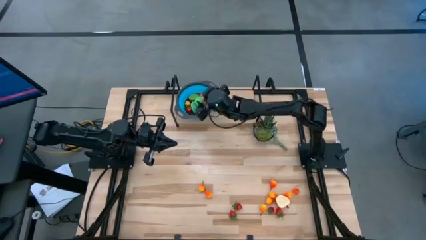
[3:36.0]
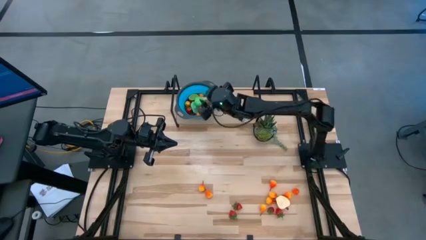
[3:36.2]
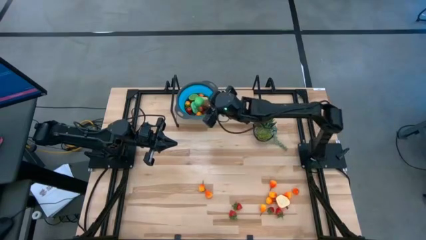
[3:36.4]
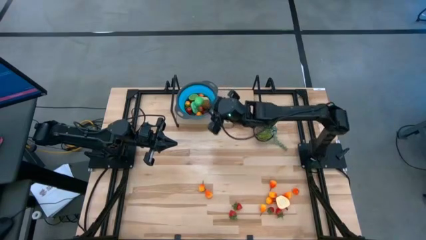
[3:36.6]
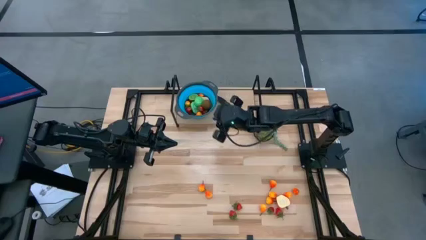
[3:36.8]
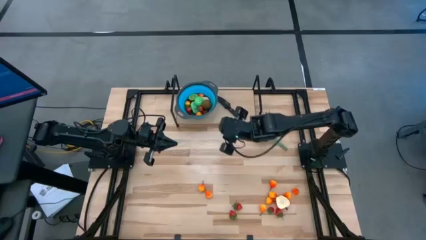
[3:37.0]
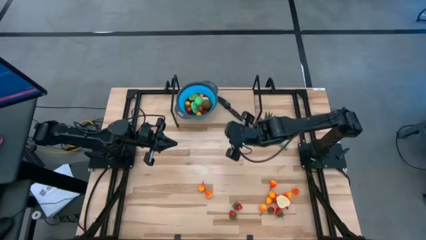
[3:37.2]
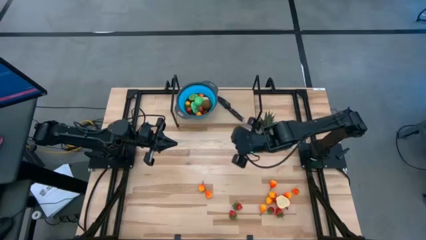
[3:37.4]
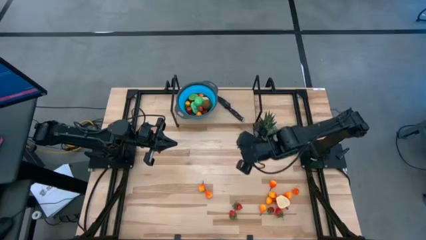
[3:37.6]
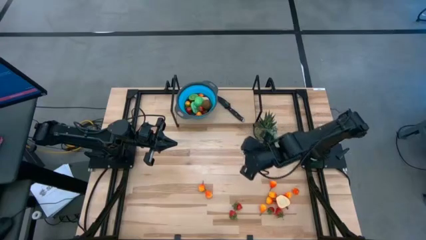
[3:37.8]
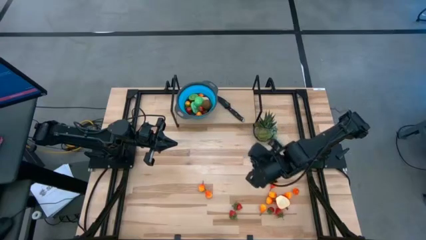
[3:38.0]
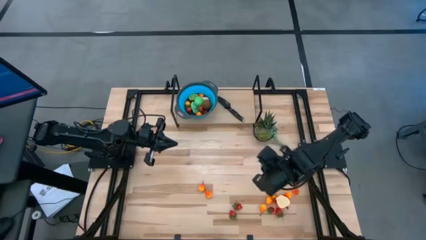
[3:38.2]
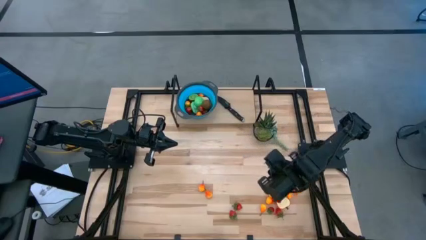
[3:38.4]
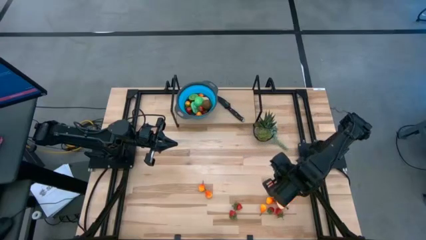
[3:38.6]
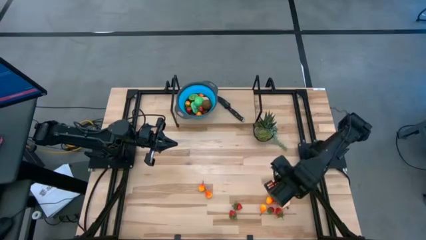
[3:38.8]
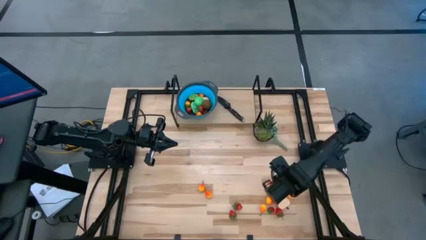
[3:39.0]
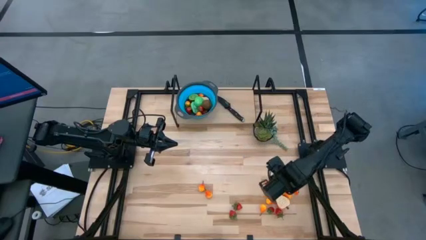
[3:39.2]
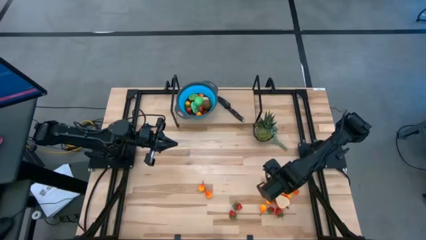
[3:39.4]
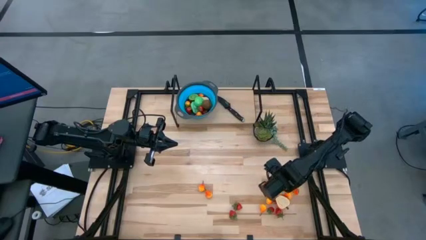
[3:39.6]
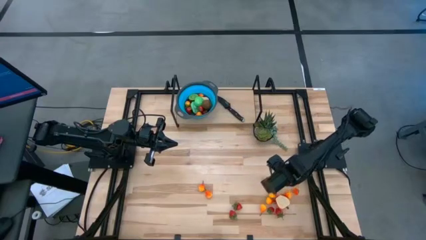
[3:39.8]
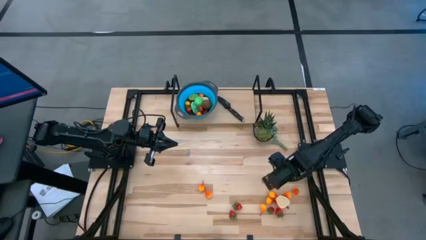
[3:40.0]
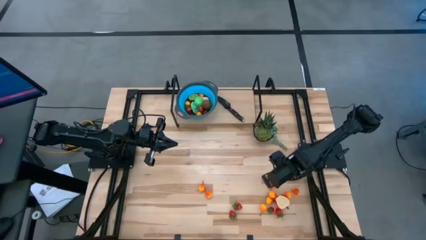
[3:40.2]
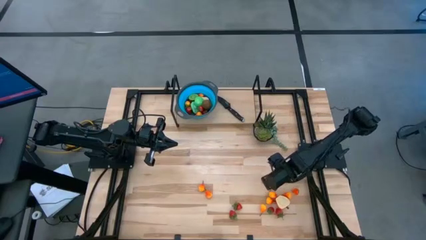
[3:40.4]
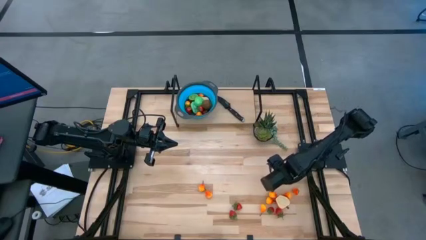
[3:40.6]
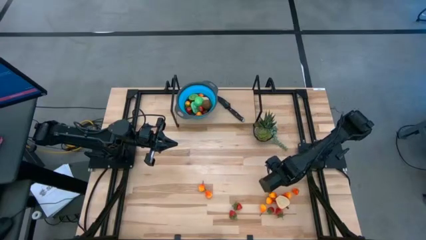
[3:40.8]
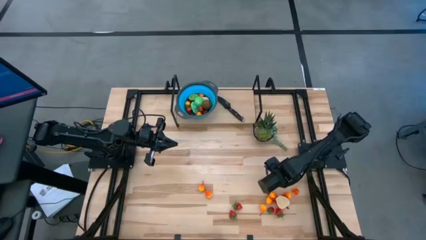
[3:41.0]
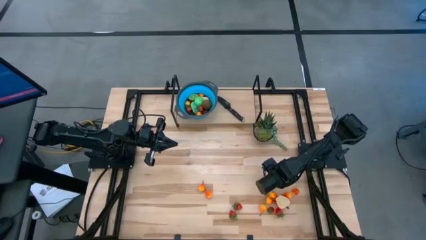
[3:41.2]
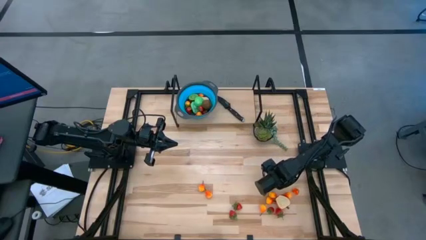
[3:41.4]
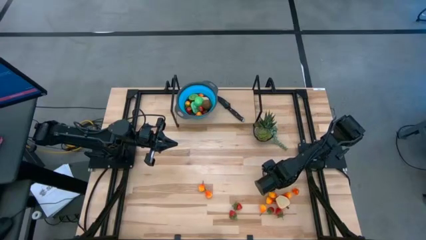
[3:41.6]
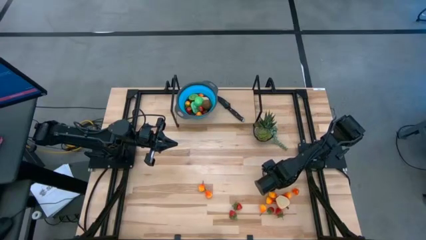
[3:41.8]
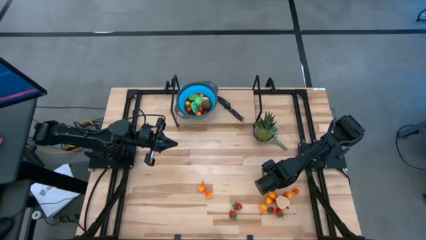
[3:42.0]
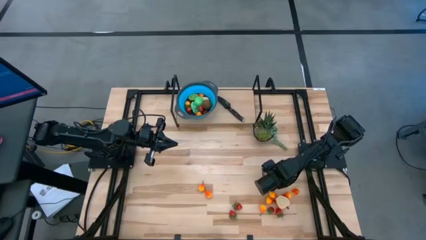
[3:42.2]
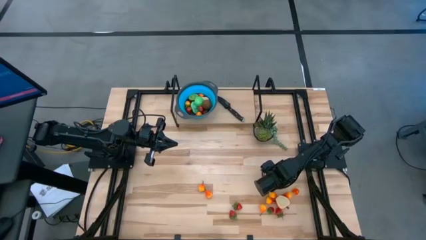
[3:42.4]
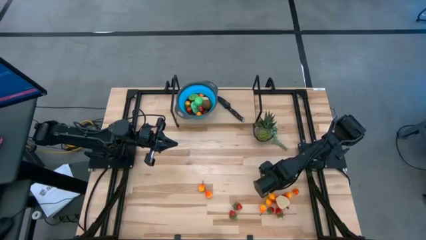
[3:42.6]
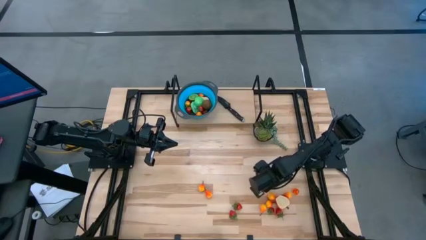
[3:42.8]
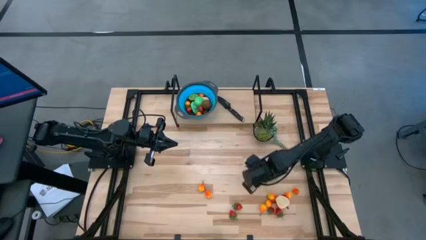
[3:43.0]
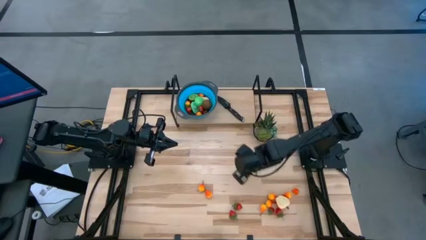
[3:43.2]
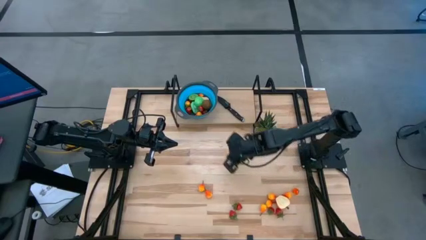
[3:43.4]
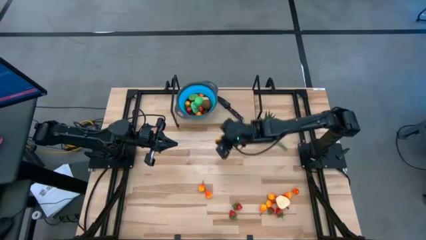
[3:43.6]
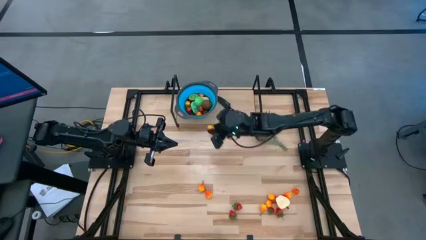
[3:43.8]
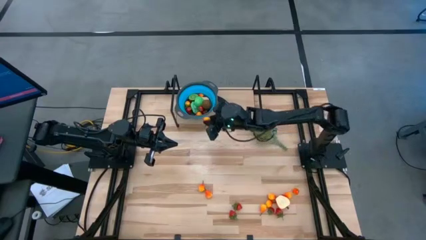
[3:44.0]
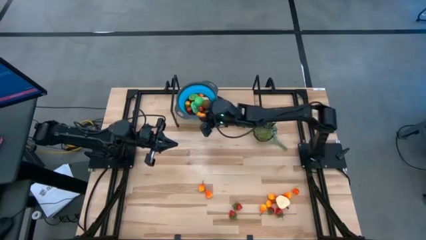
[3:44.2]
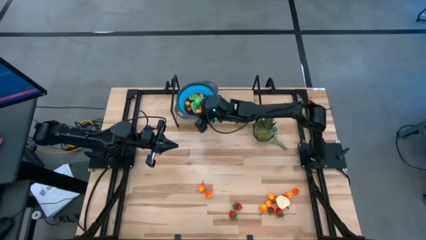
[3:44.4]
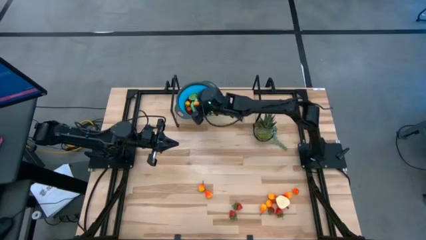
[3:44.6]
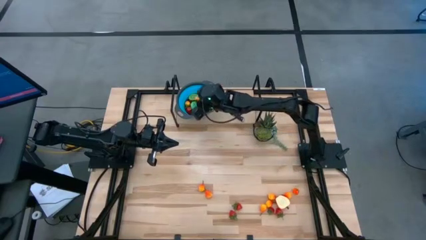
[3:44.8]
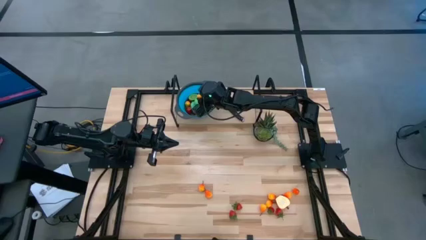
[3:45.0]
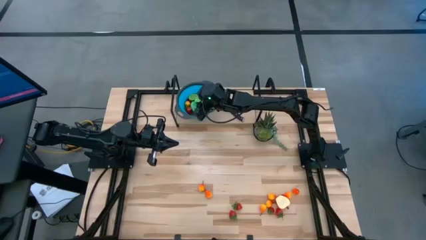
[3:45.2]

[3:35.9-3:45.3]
Task: Pick & Place Fruit
Put the pear into the basket

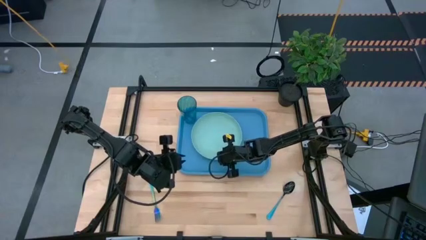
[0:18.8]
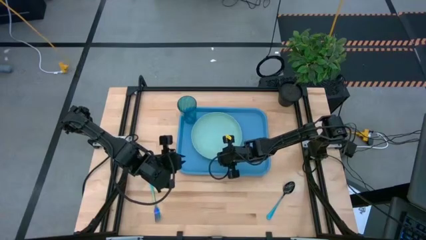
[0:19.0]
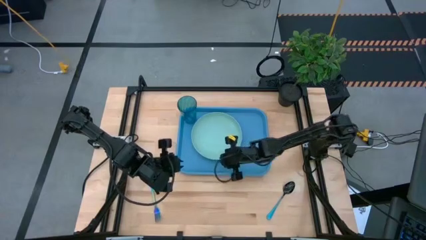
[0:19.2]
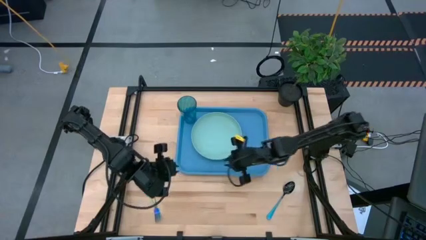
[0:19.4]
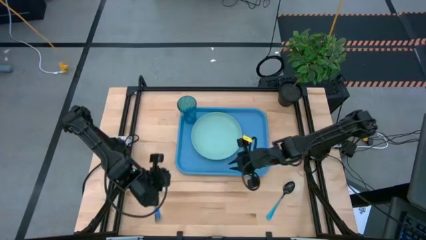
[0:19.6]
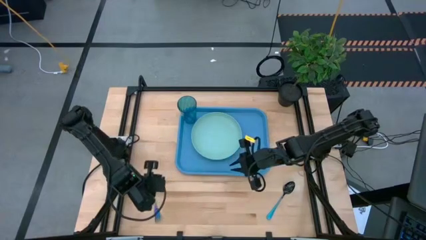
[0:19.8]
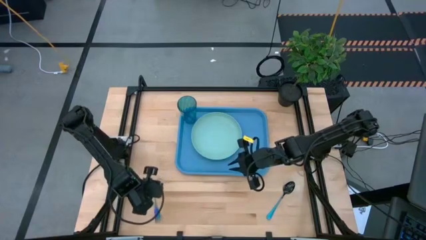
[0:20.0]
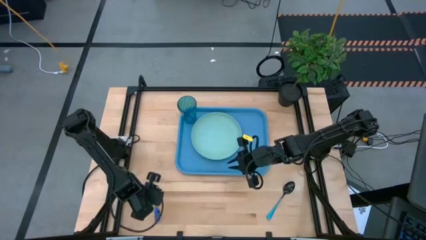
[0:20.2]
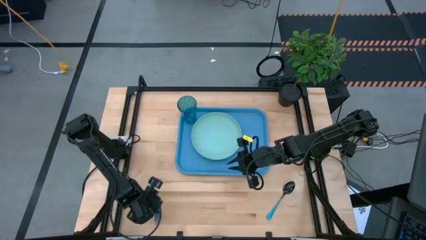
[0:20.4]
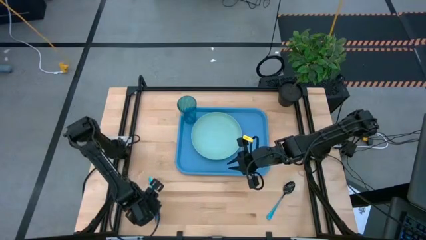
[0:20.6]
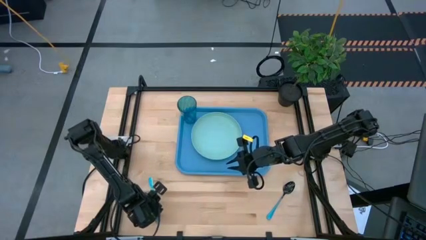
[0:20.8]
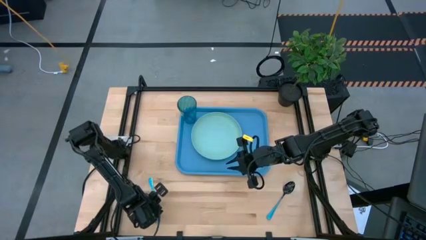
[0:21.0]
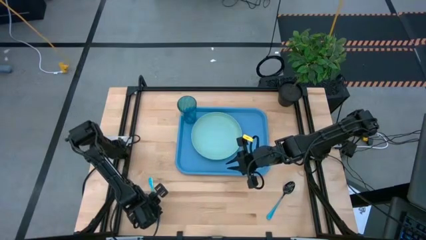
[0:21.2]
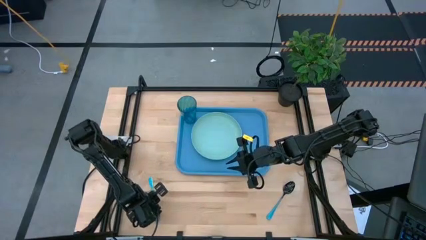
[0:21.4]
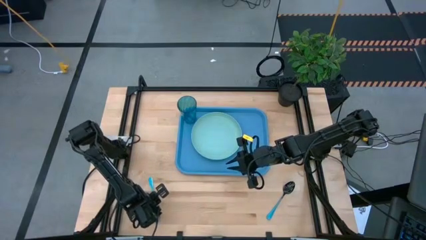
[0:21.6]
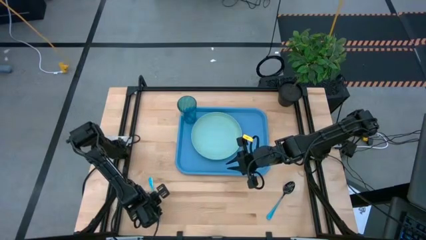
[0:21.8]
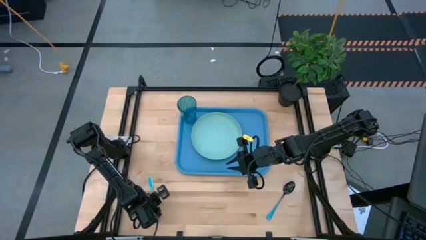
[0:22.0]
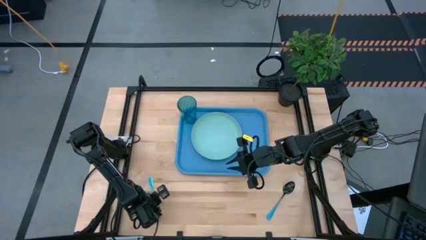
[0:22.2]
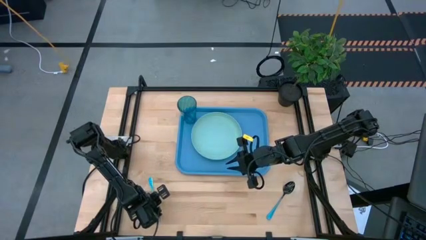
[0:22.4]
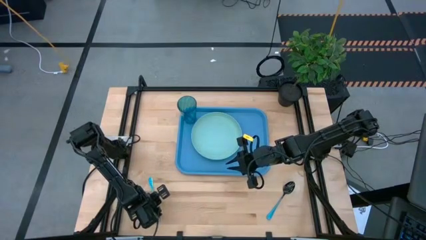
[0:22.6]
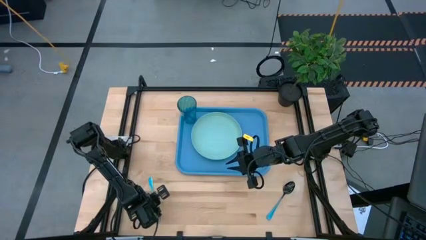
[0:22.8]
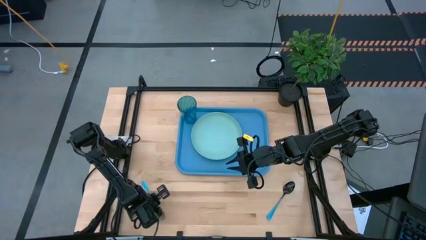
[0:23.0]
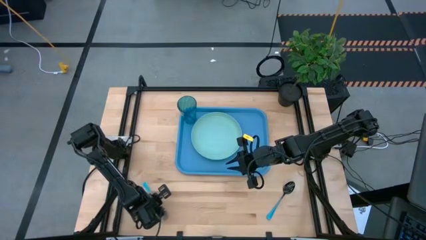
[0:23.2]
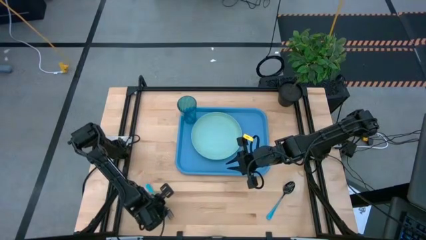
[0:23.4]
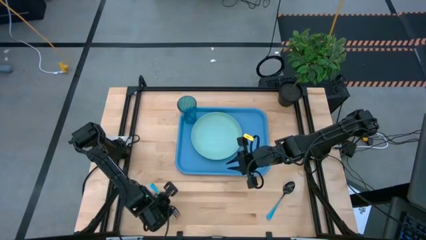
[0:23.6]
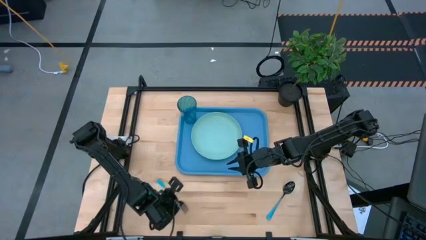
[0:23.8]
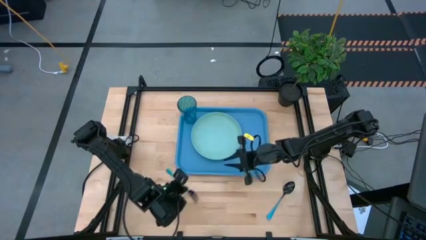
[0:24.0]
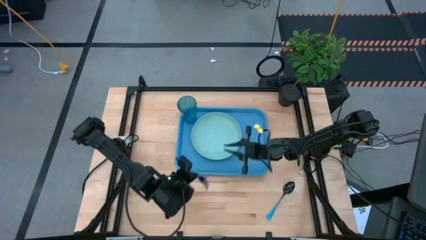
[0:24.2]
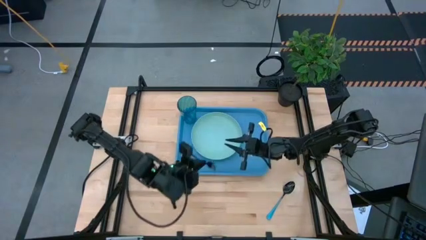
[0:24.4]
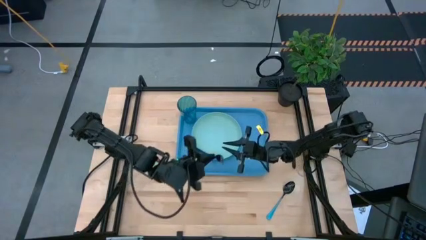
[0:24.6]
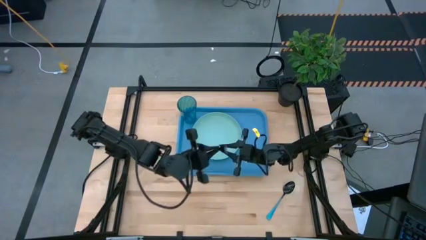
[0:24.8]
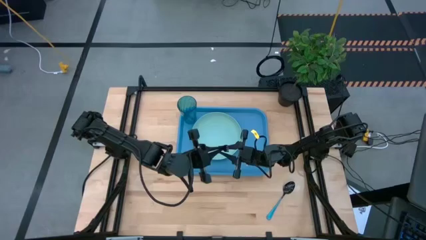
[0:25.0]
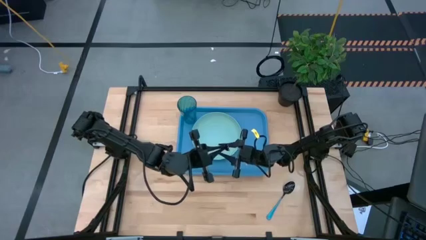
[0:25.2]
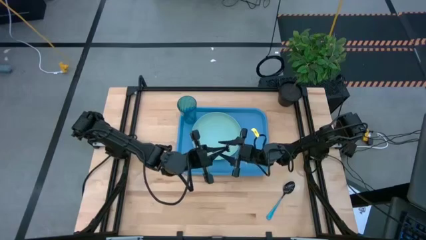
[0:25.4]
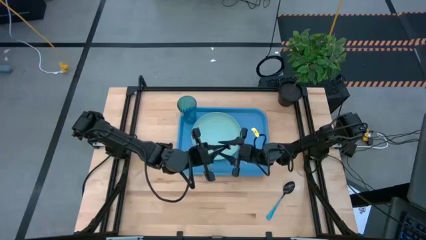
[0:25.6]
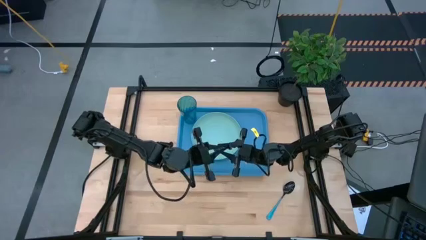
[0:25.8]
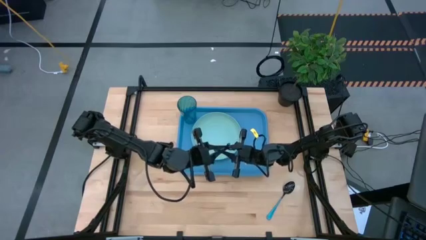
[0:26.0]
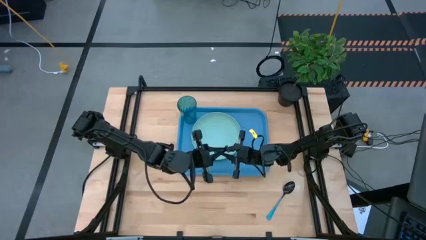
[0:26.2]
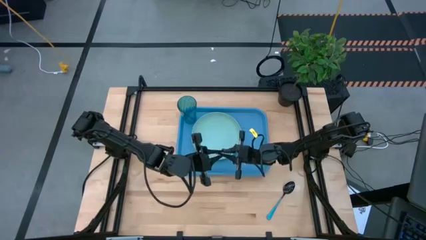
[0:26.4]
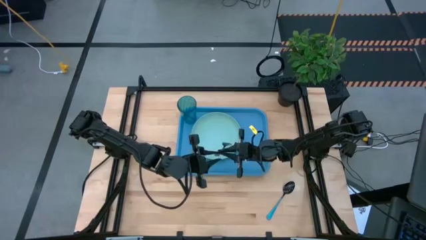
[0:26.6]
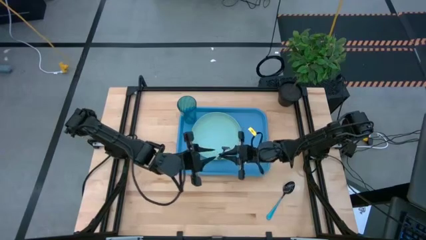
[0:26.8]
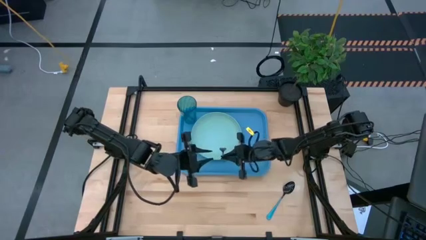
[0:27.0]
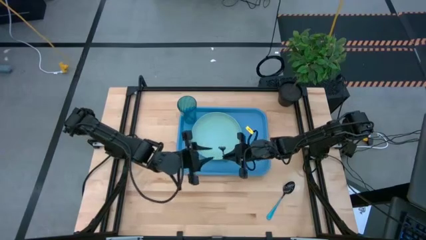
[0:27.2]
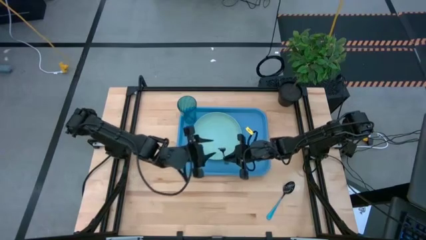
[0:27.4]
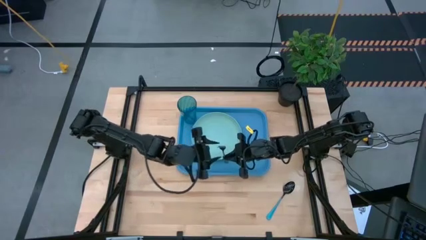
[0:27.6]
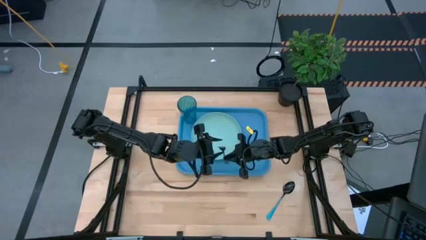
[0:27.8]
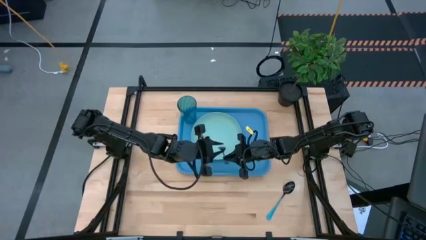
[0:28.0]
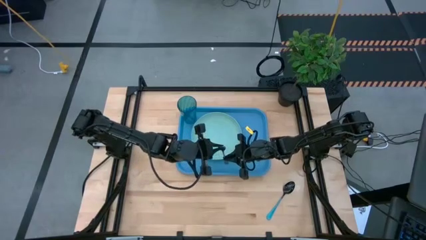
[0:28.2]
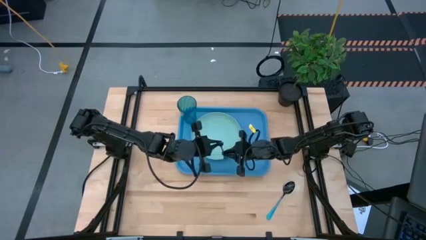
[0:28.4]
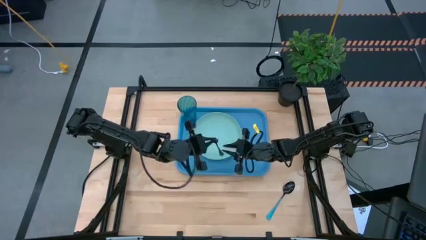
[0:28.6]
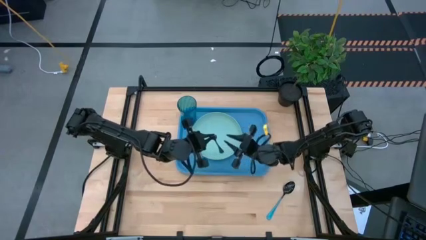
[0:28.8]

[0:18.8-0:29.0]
Task: Pick and place plate/cup/fork/spoon on tray
Put the blue fork on the blue serving tray
